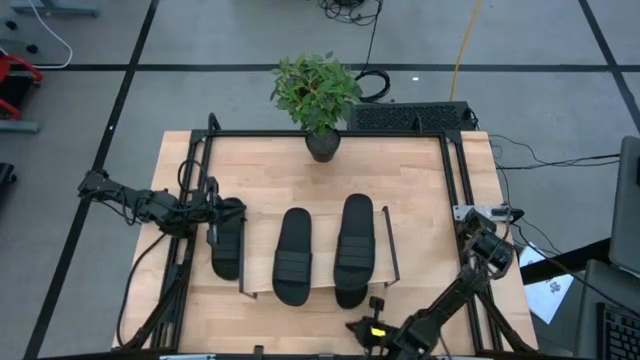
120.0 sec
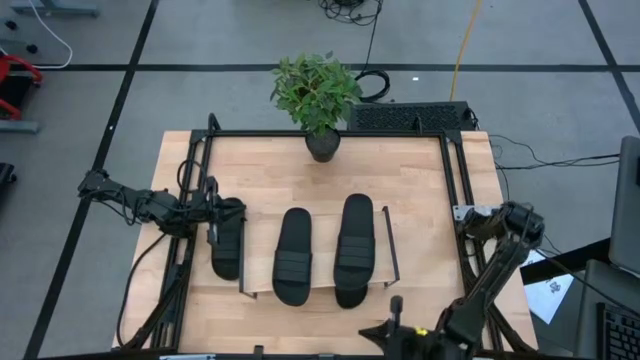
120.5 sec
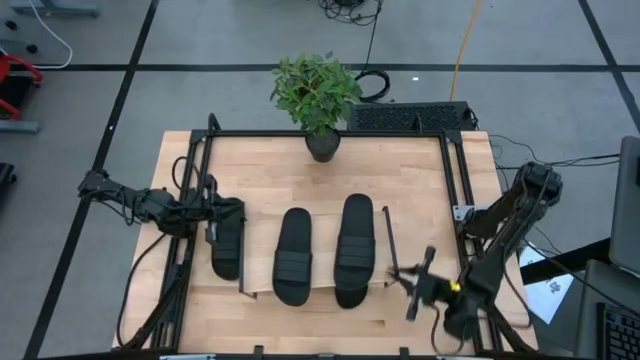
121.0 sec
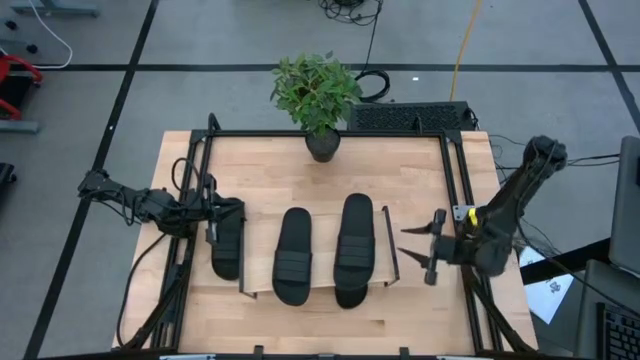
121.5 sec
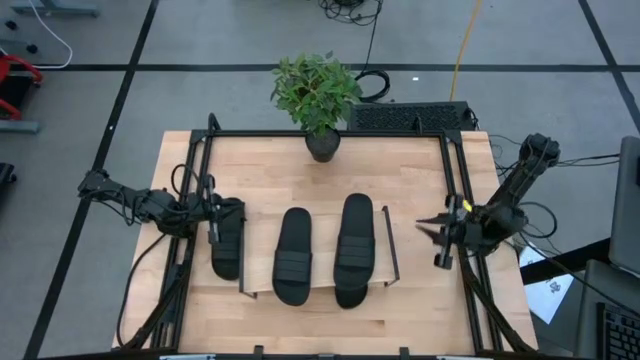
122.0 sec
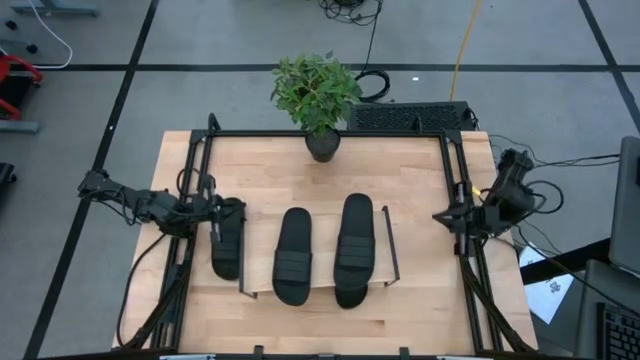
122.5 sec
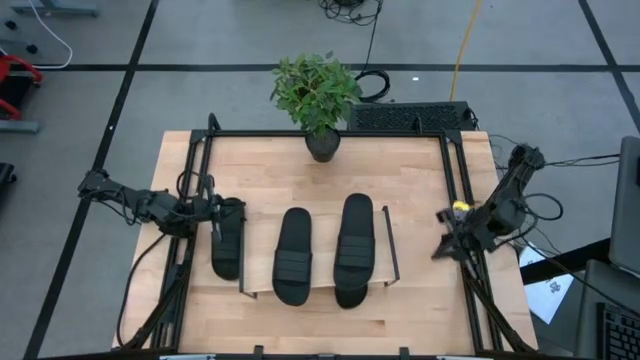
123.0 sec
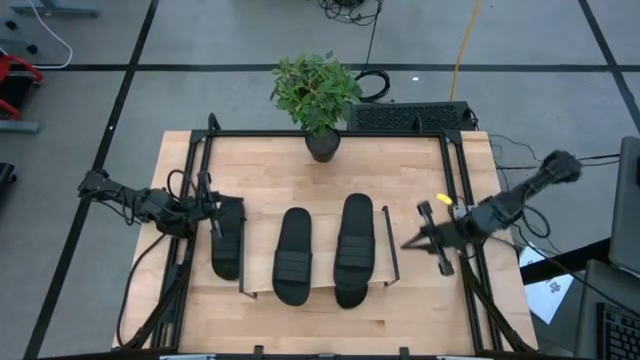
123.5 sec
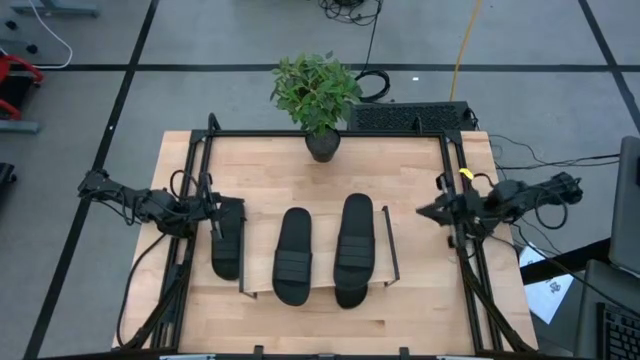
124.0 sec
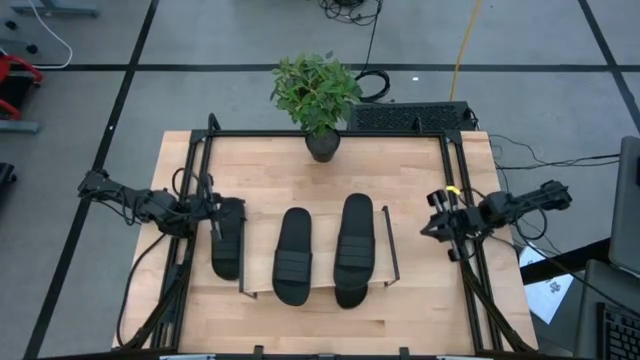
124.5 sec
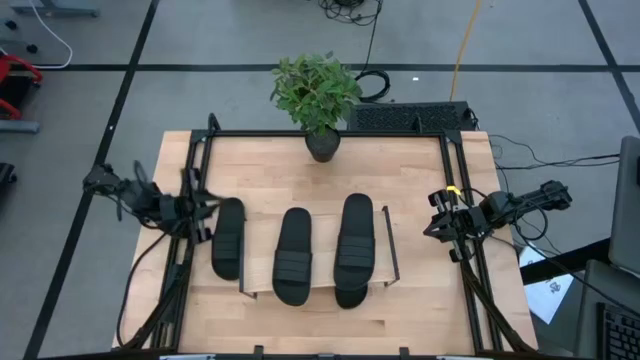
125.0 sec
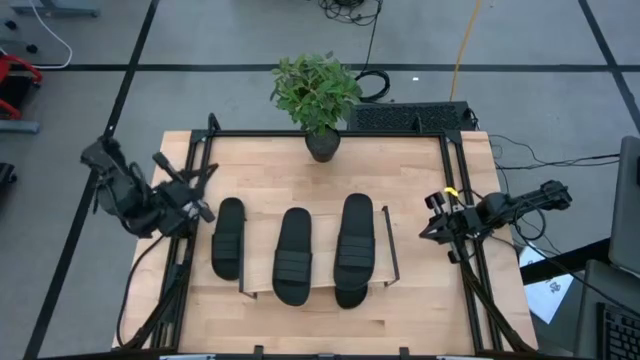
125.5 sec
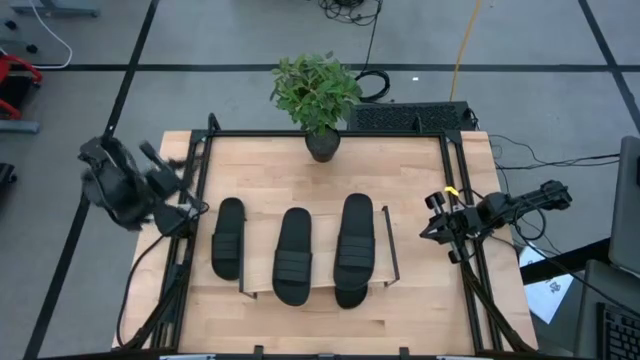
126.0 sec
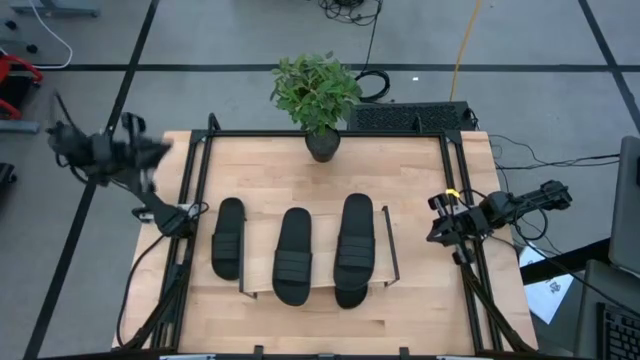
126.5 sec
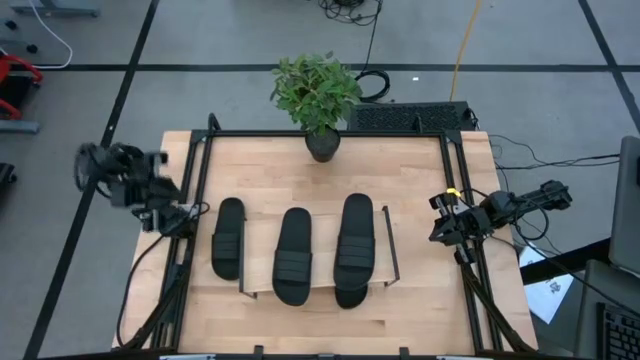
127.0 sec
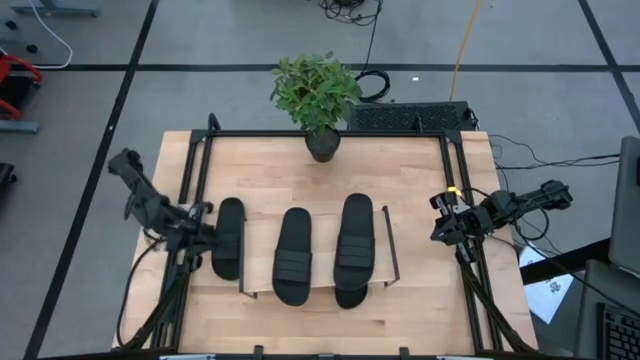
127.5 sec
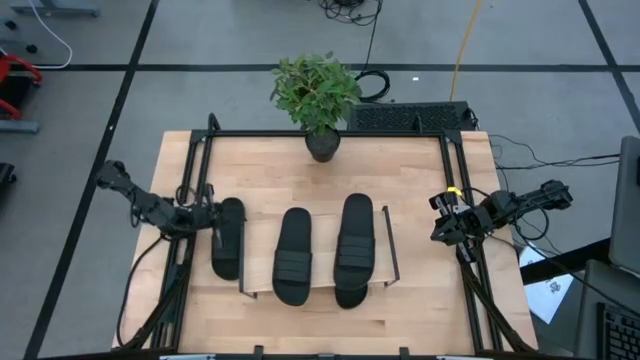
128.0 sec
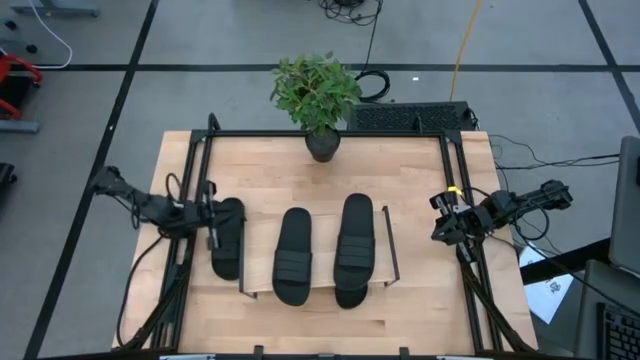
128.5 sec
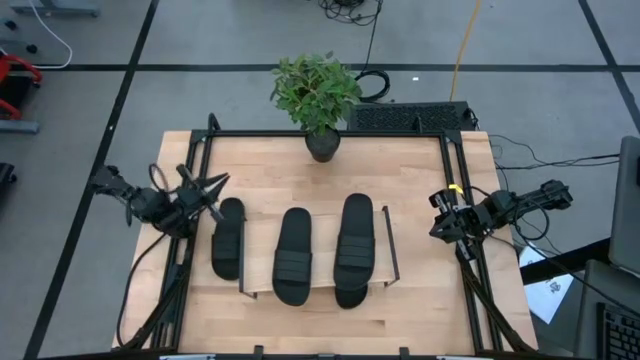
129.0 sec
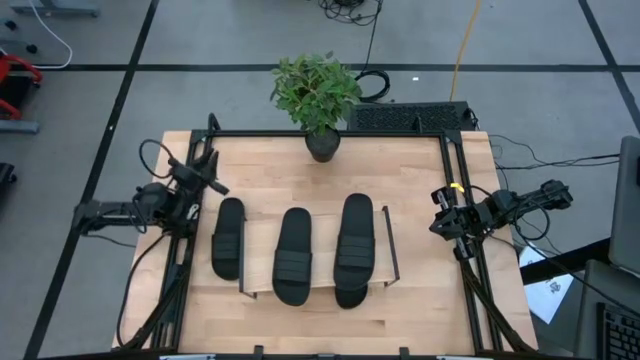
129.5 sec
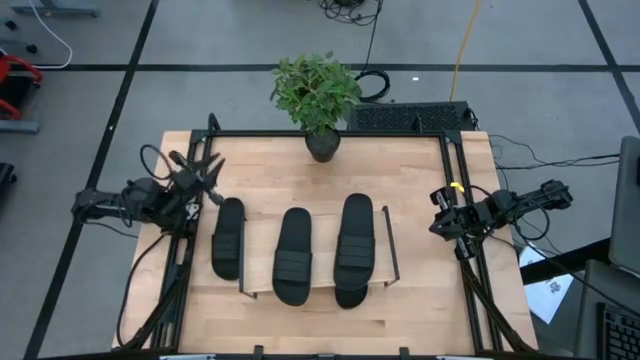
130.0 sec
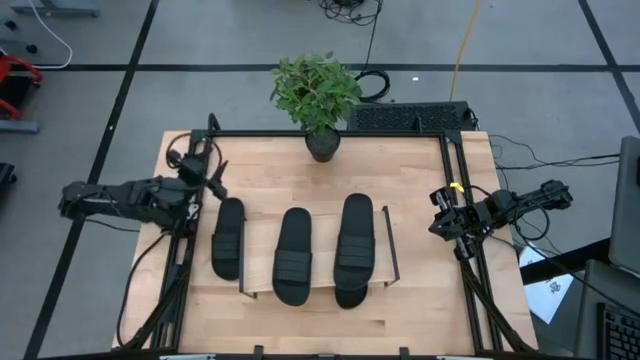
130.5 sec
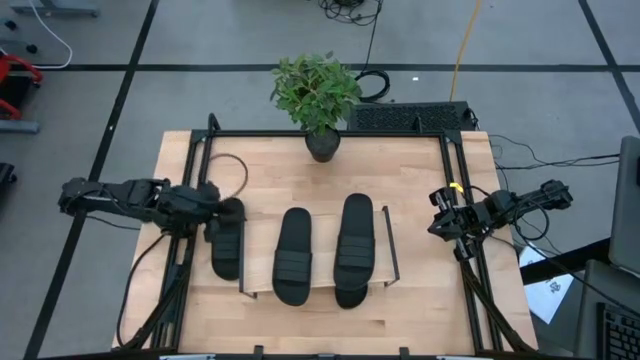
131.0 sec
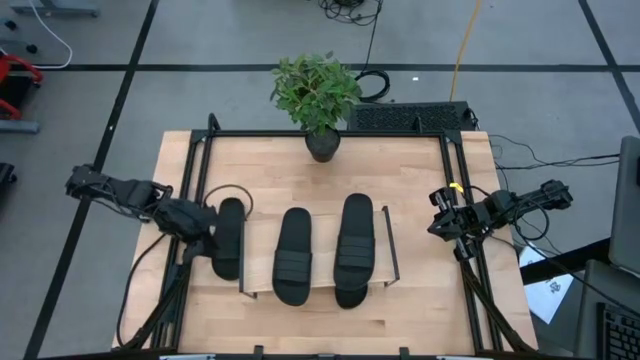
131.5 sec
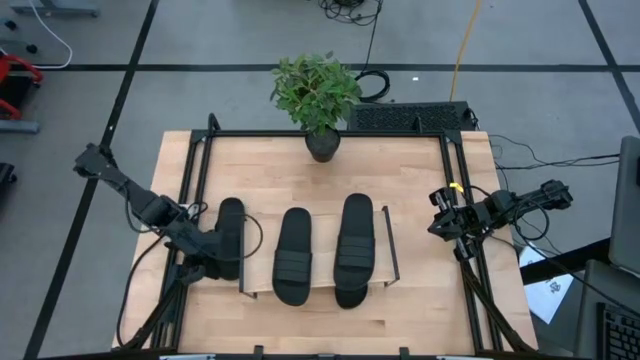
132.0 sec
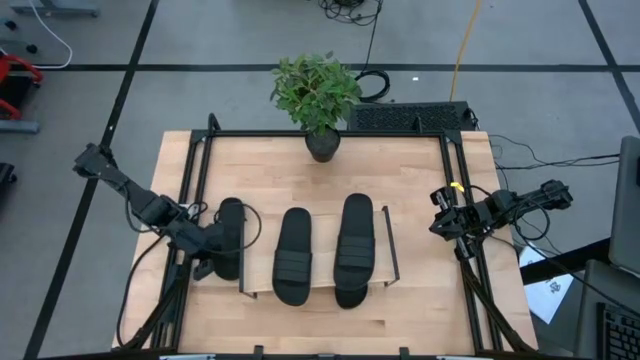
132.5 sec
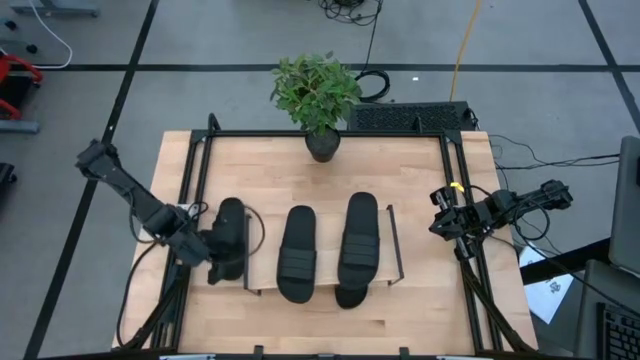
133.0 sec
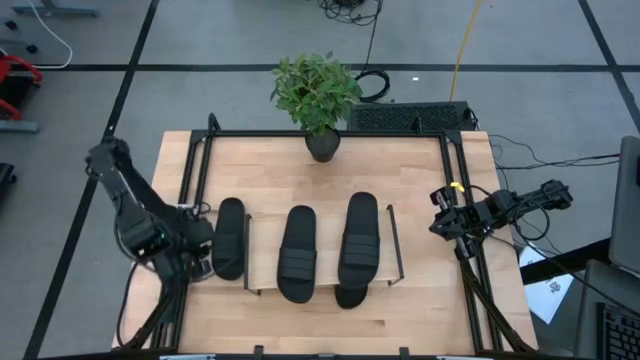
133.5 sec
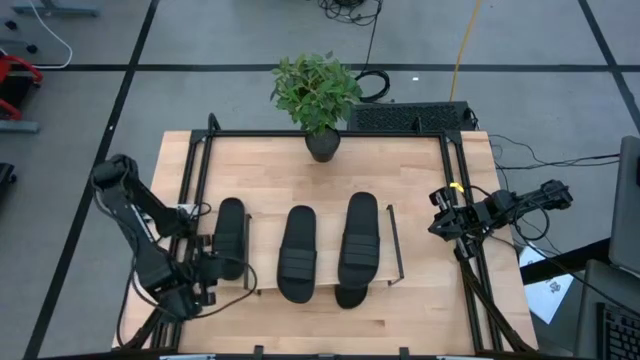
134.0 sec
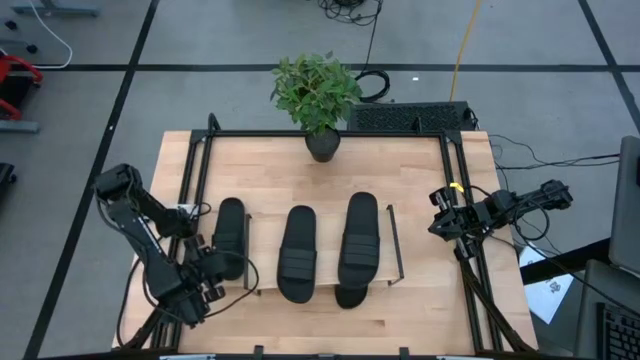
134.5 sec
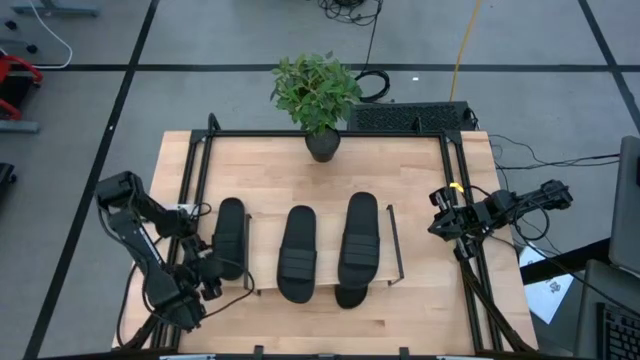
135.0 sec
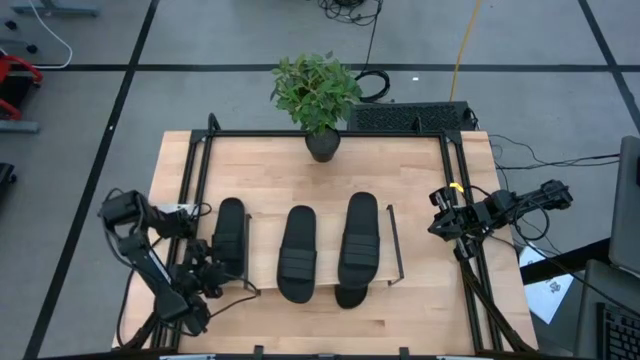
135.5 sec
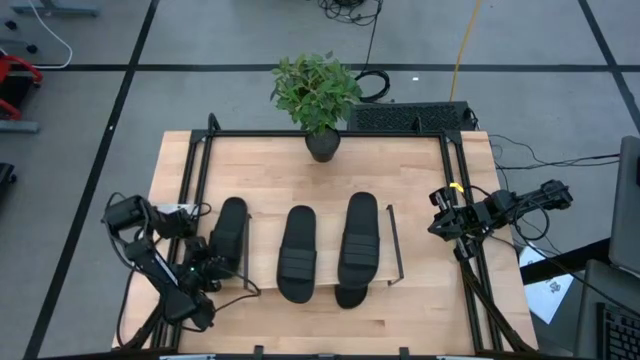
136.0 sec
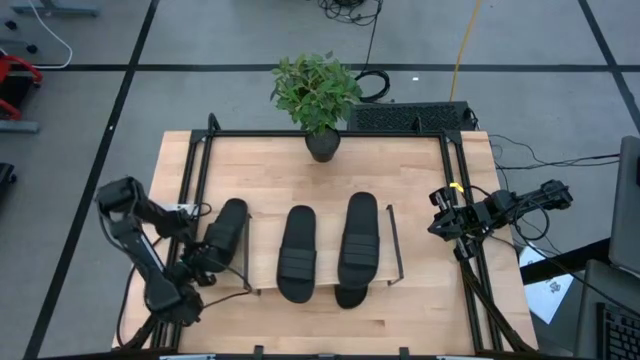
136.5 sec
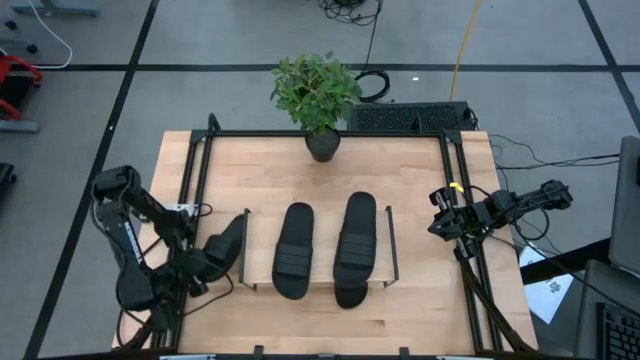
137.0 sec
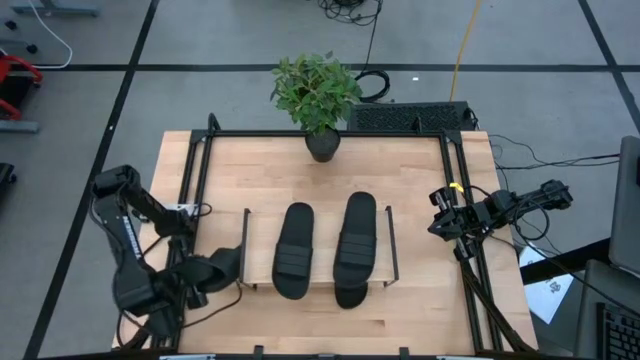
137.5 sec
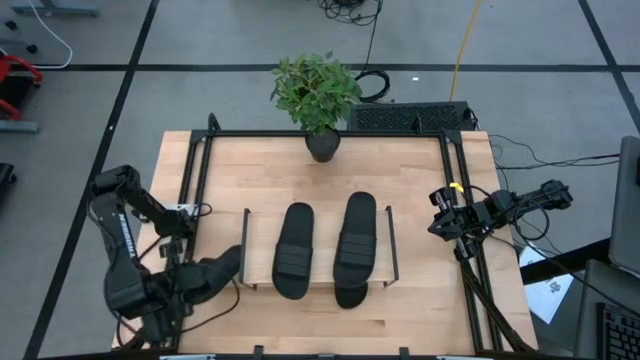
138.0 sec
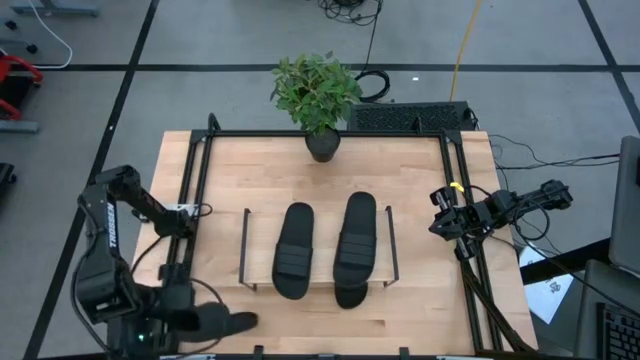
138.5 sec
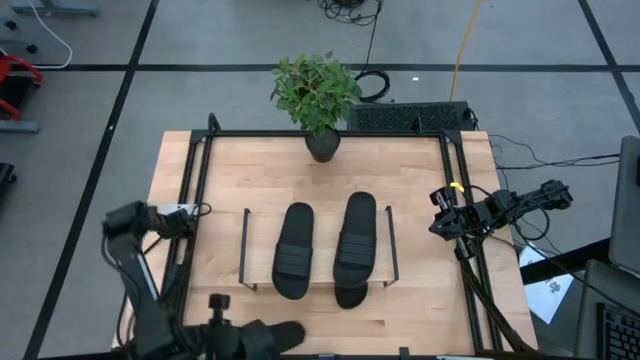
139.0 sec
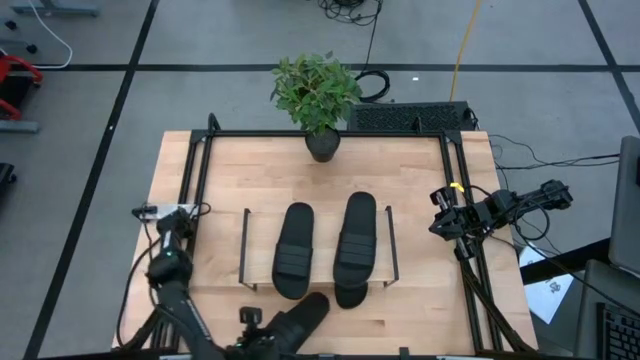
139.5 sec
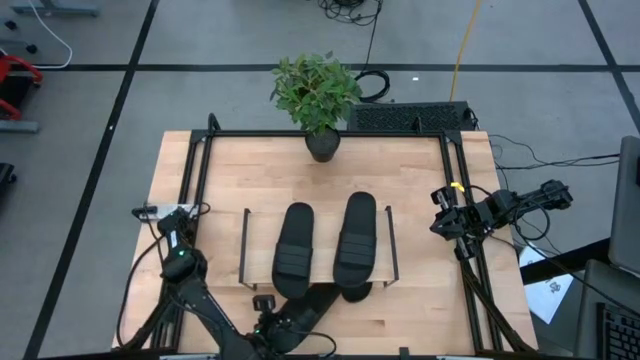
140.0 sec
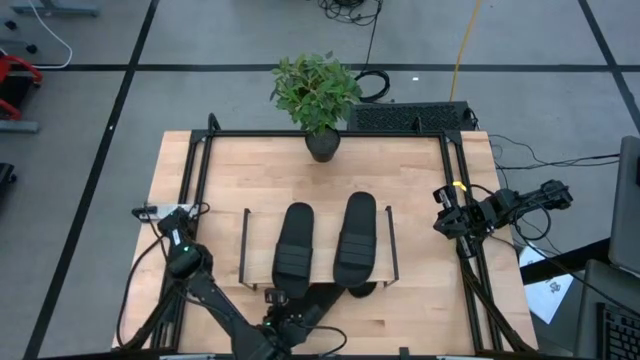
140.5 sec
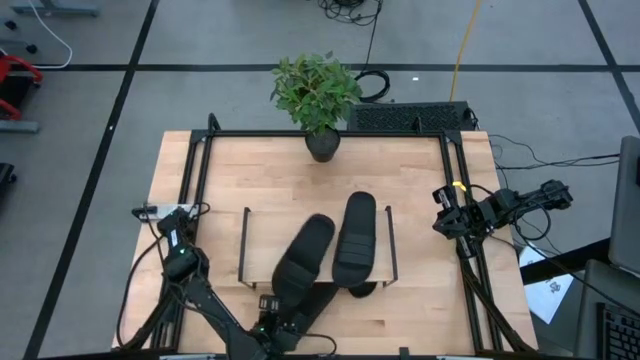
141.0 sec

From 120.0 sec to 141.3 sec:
Task: Pick and place slides into the shelf
Put the black slipper under the shelf

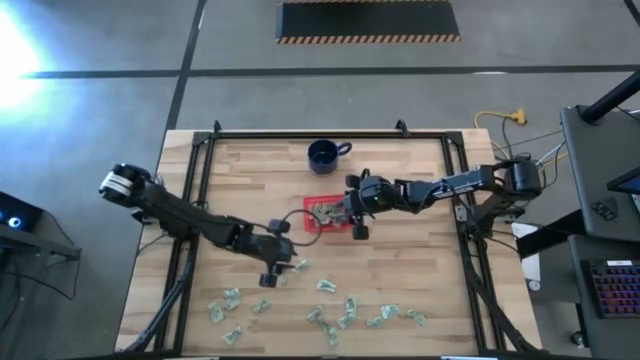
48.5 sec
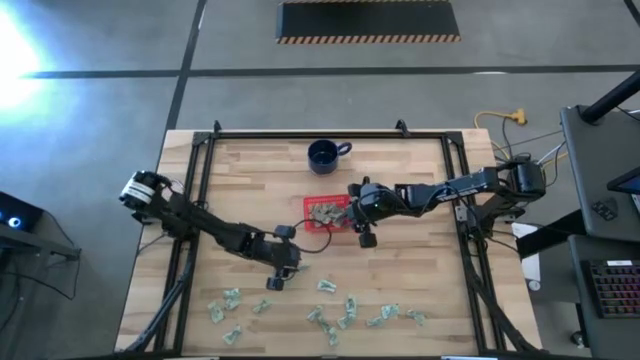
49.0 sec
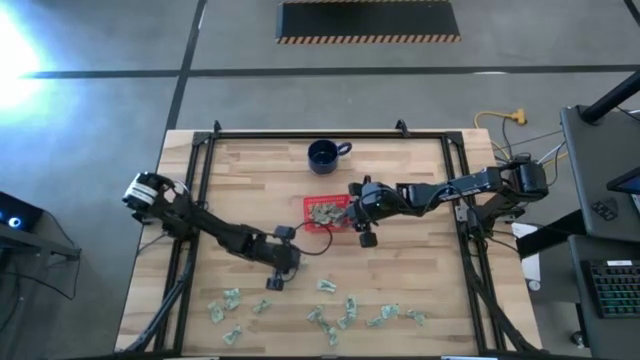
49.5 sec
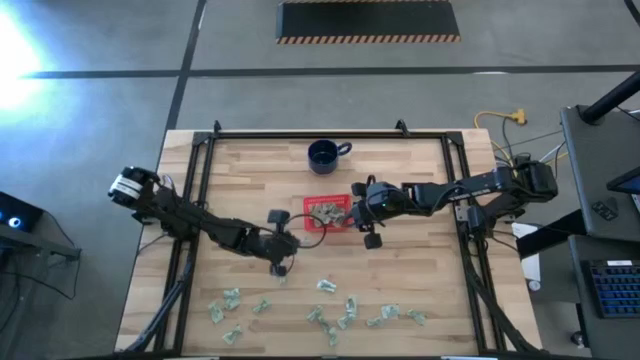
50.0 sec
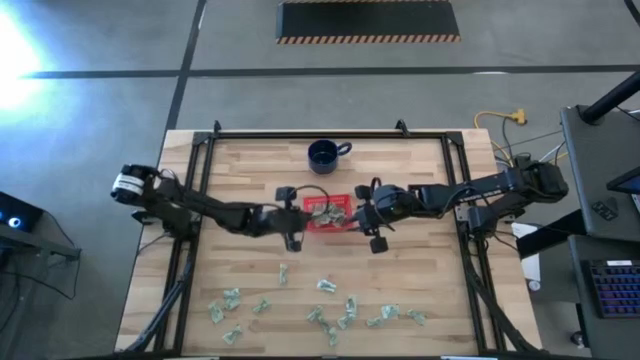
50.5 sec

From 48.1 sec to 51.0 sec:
Task: Pick and place items into bin
Put the stevia packet into the red bin
